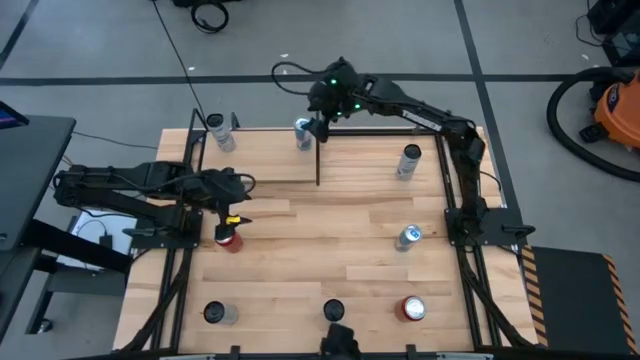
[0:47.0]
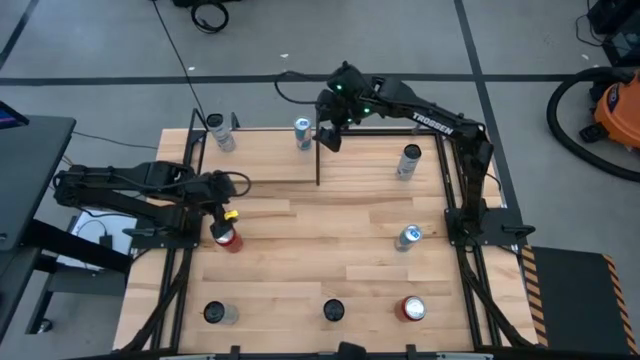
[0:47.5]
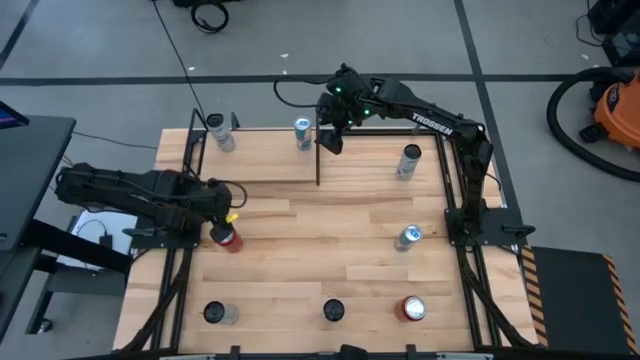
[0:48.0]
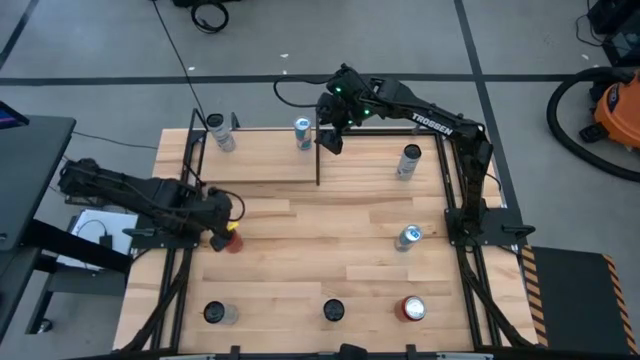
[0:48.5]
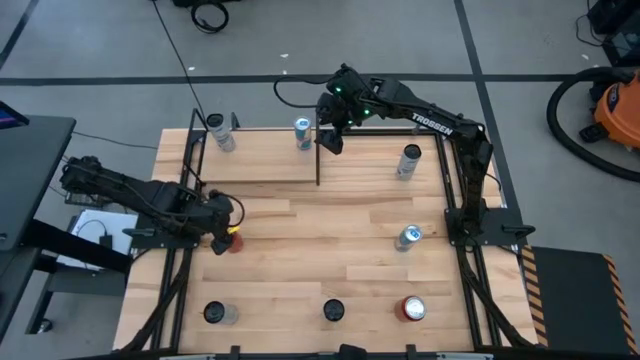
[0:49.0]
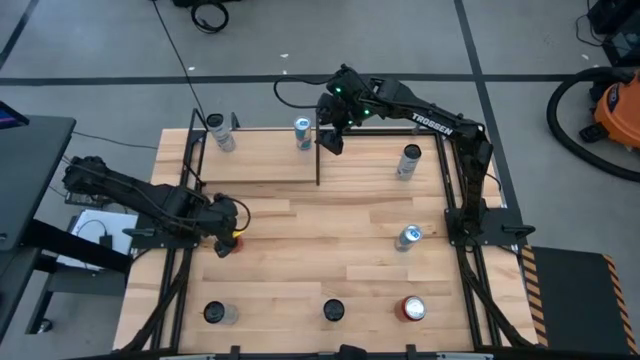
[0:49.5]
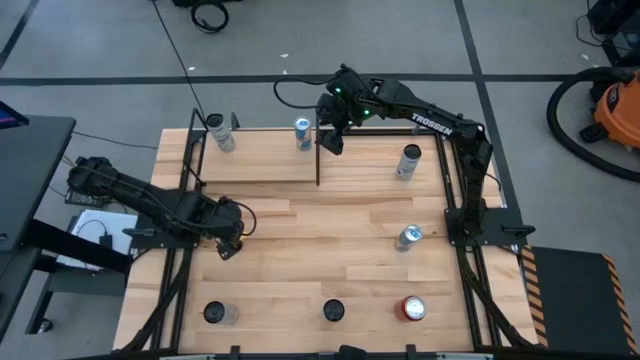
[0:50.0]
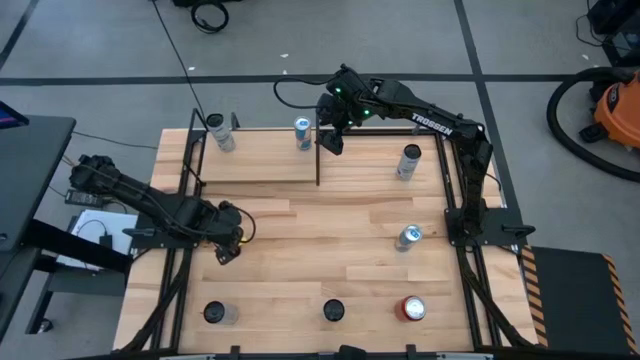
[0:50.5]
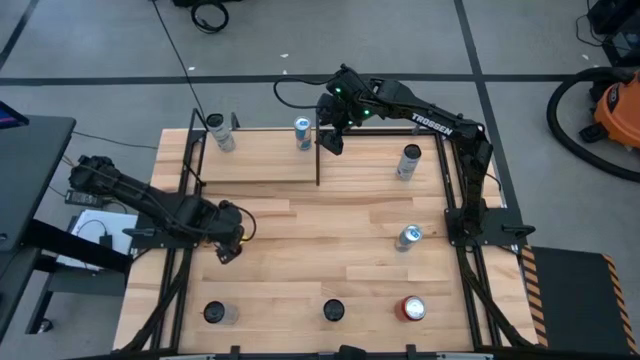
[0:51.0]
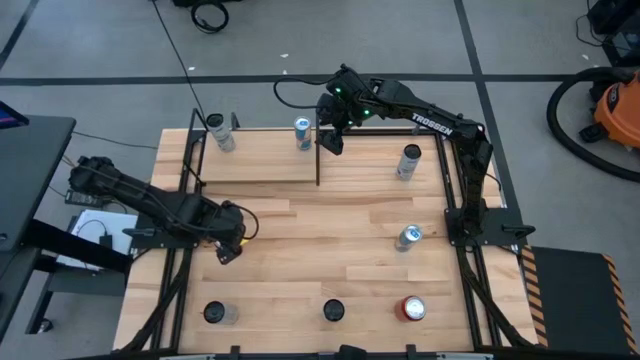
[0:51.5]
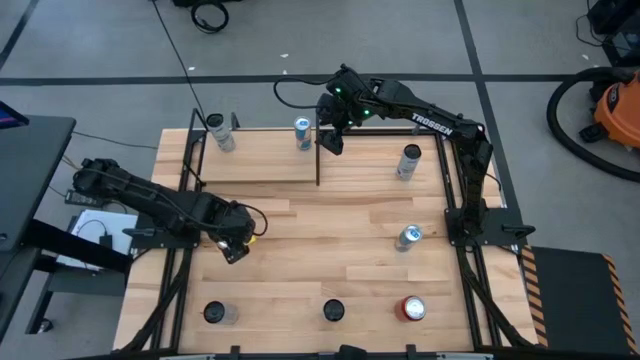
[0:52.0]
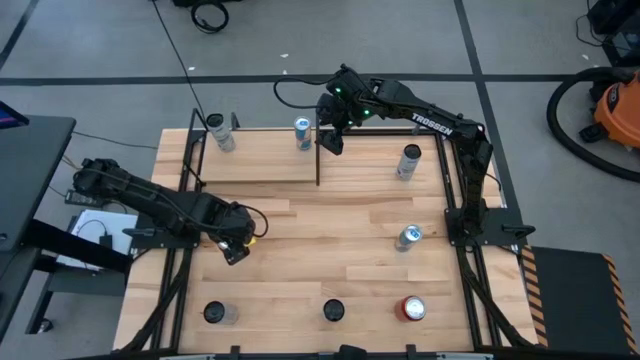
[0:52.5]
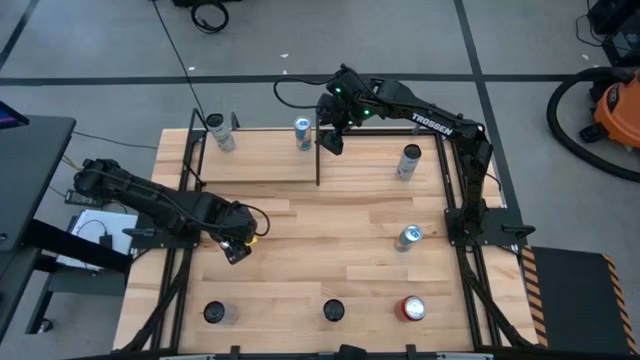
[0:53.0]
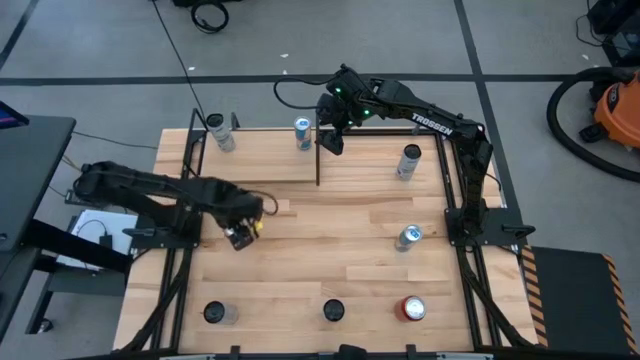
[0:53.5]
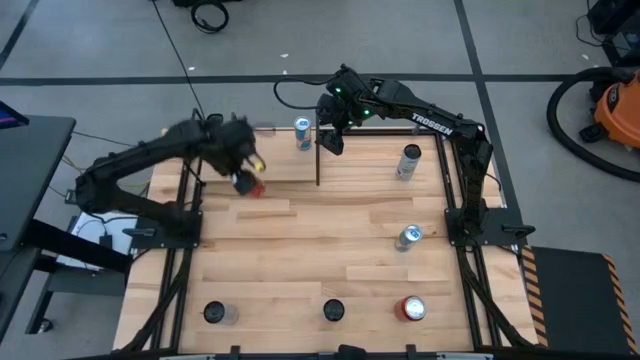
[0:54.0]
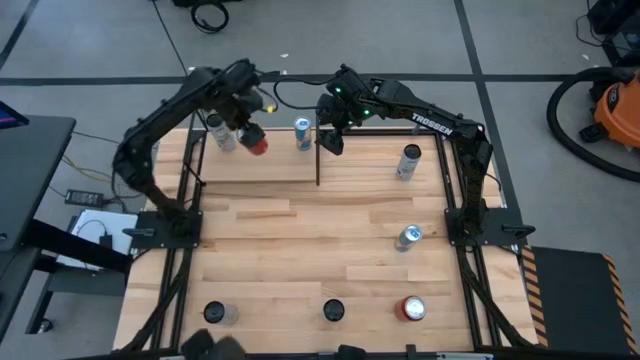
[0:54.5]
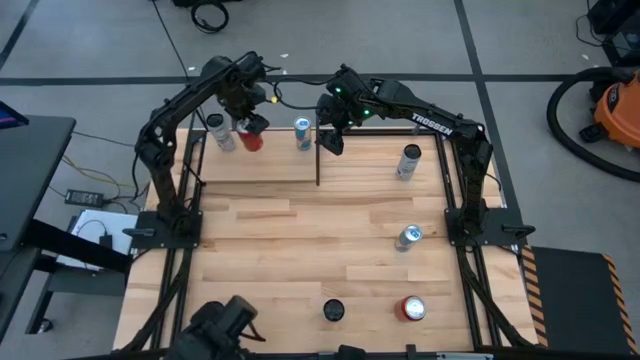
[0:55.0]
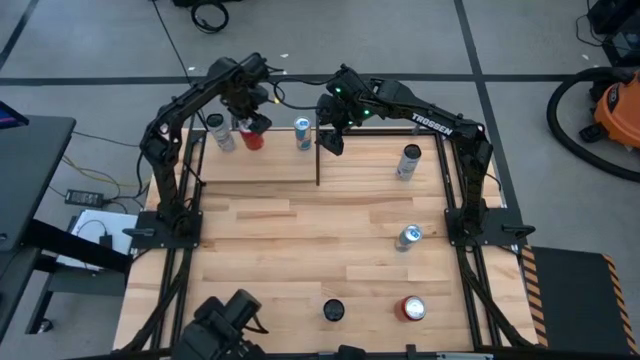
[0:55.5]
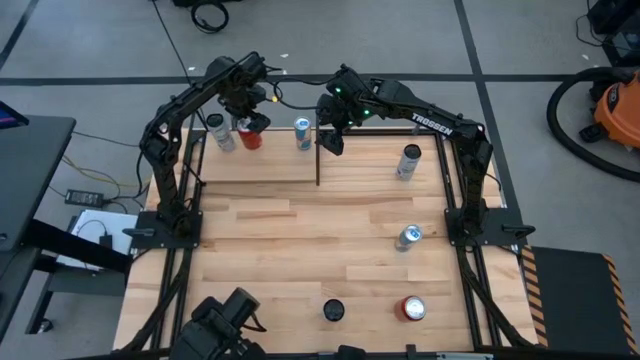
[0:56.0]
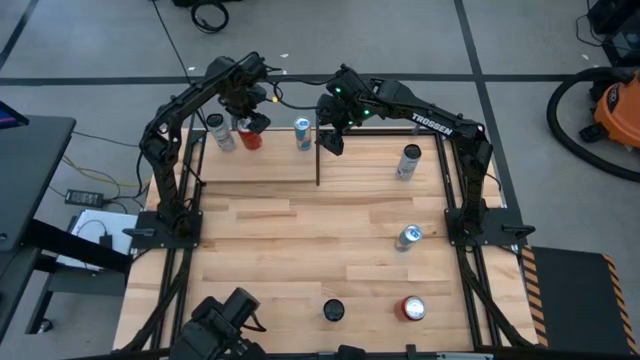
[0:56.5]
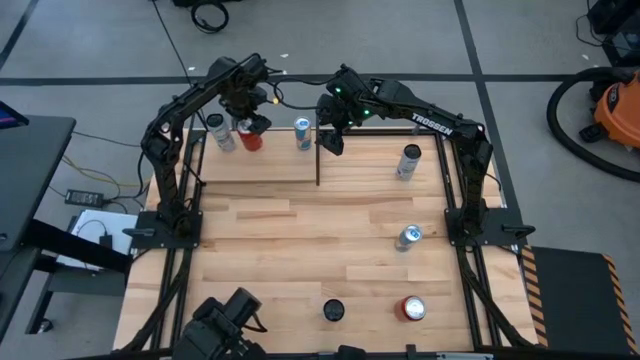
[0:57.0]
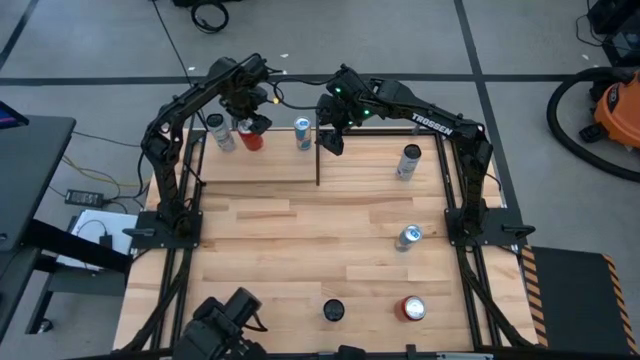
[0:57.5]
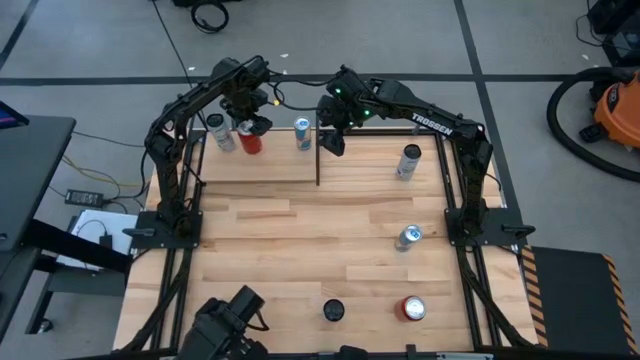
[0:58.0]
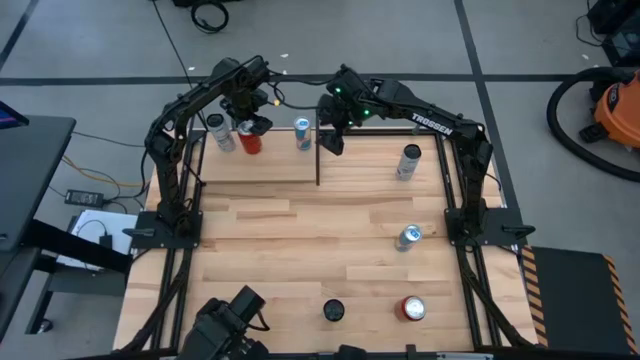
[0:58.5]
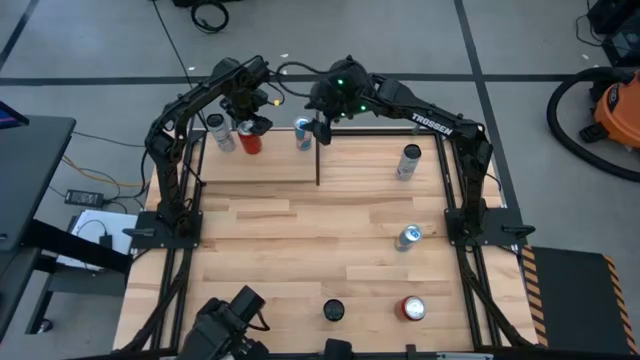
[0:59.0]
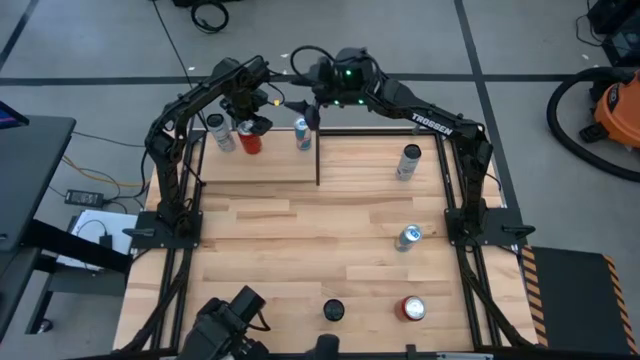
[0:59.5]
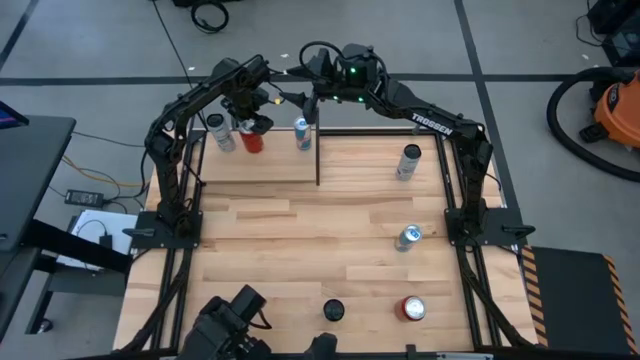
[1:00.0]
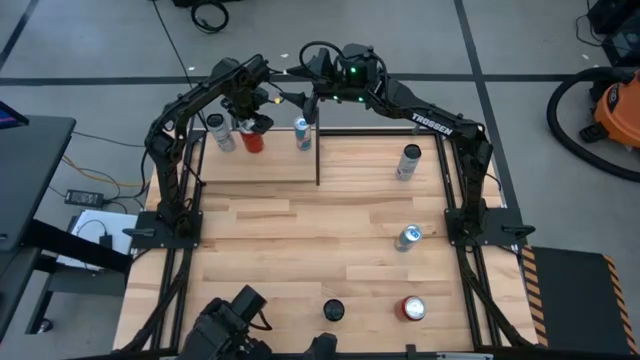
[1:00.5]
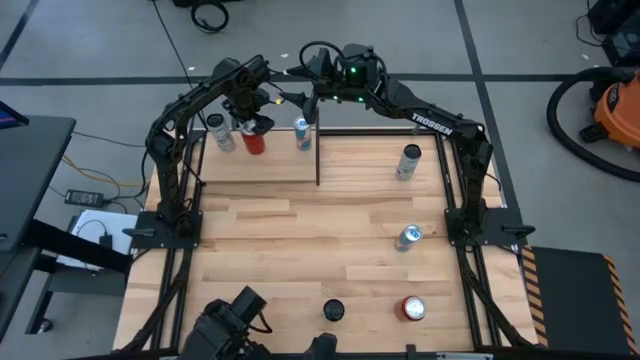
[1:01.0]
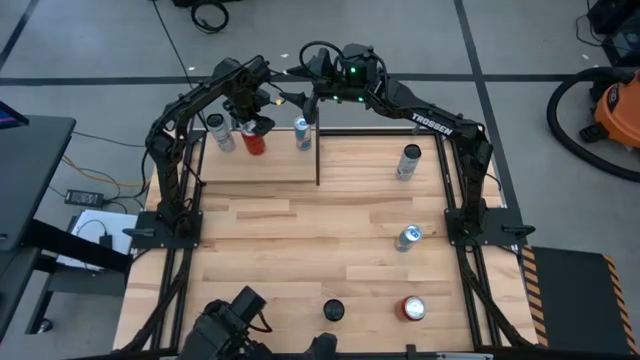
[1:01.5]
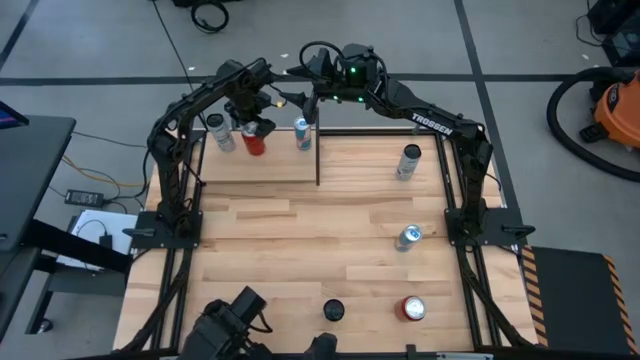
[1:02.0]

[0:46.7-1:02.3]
Task: Place canned beverage on shelf
Put the red soda can on the shelf
